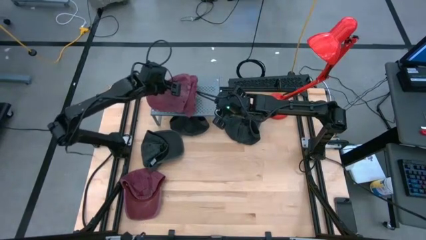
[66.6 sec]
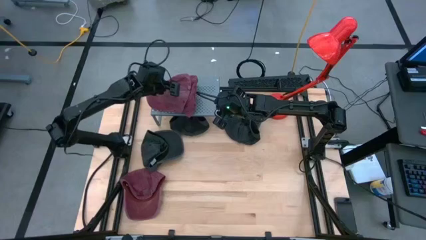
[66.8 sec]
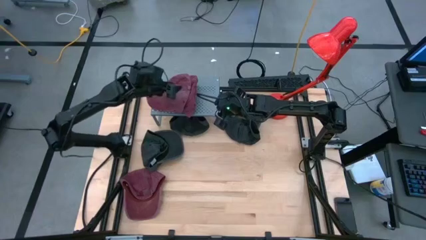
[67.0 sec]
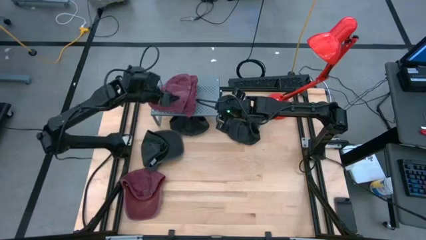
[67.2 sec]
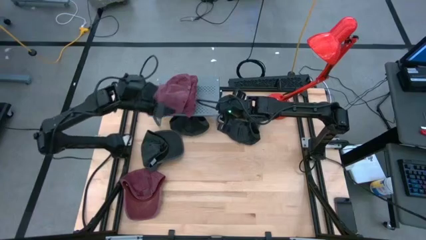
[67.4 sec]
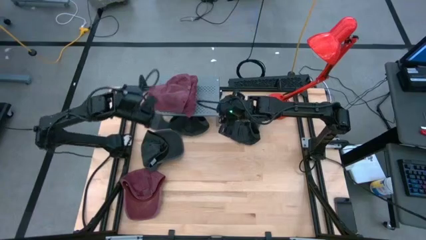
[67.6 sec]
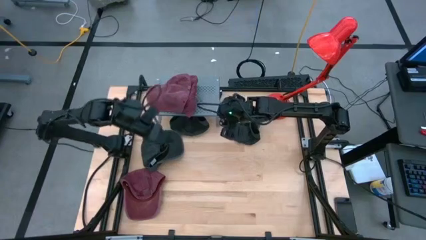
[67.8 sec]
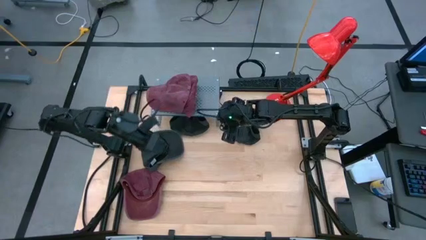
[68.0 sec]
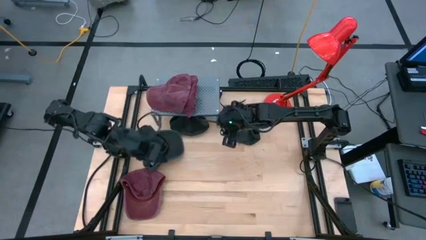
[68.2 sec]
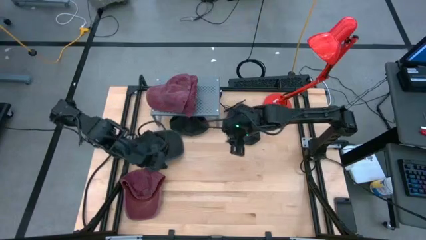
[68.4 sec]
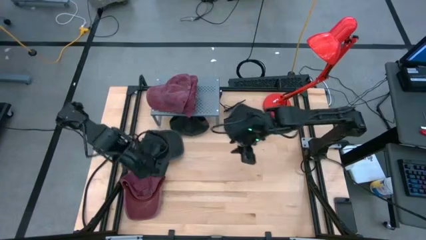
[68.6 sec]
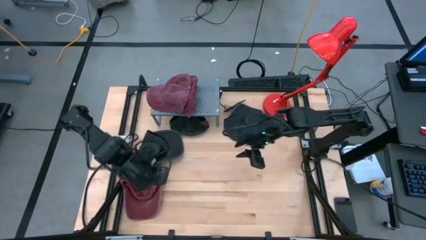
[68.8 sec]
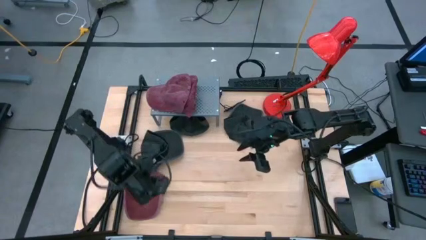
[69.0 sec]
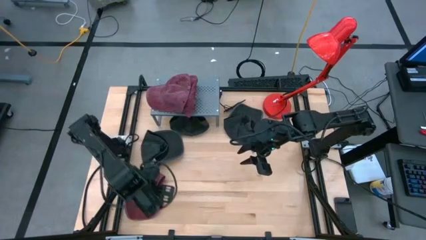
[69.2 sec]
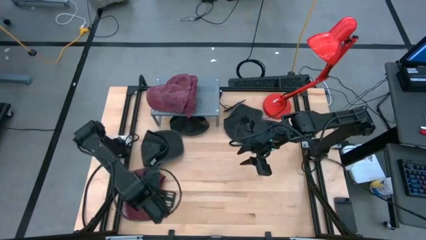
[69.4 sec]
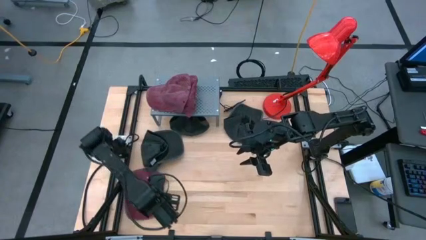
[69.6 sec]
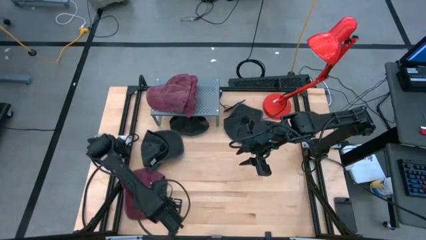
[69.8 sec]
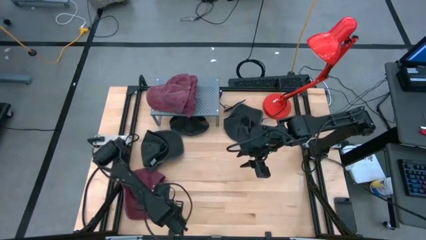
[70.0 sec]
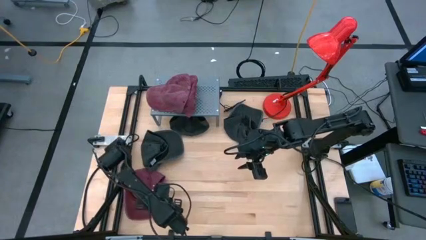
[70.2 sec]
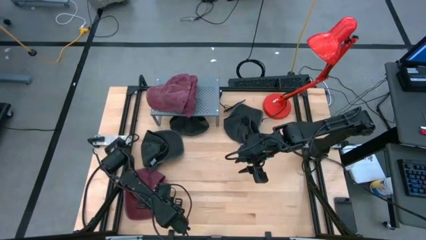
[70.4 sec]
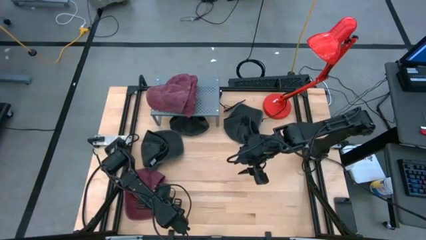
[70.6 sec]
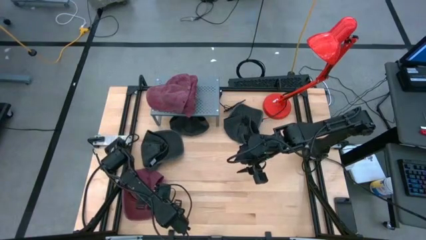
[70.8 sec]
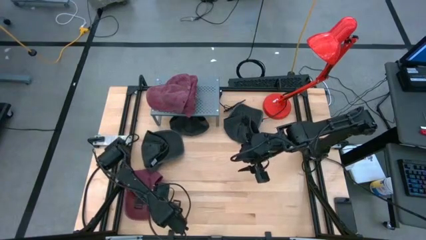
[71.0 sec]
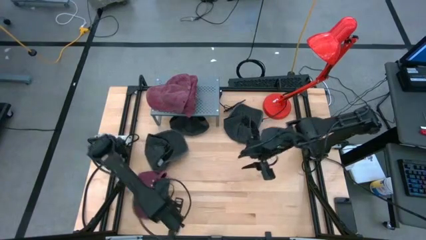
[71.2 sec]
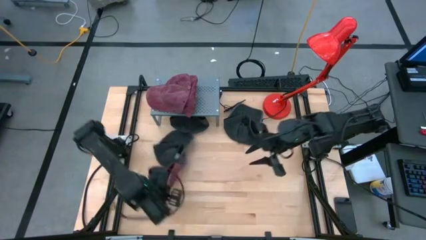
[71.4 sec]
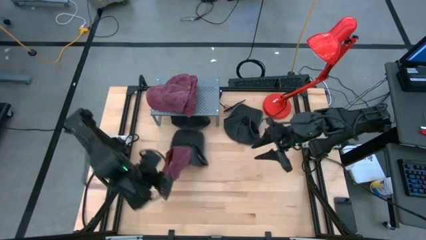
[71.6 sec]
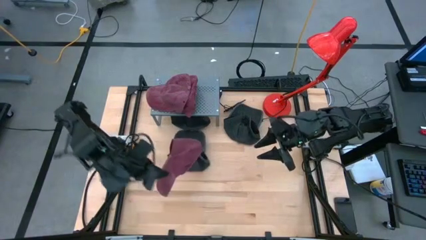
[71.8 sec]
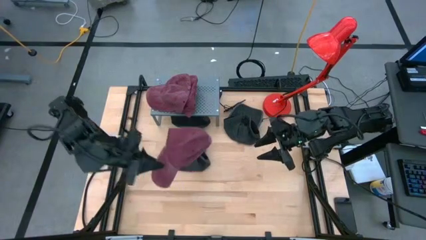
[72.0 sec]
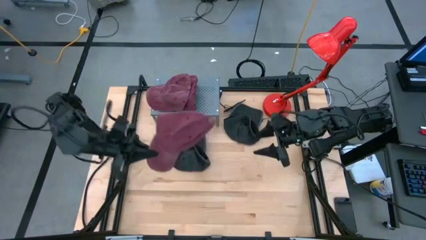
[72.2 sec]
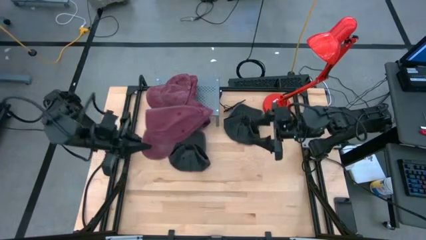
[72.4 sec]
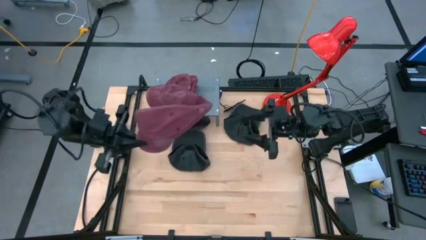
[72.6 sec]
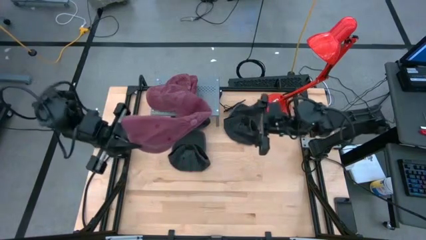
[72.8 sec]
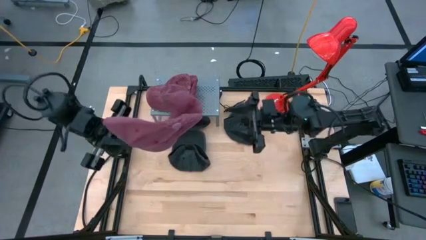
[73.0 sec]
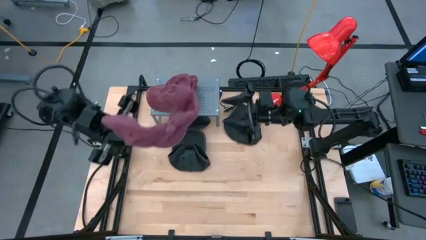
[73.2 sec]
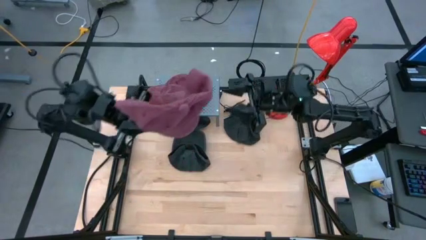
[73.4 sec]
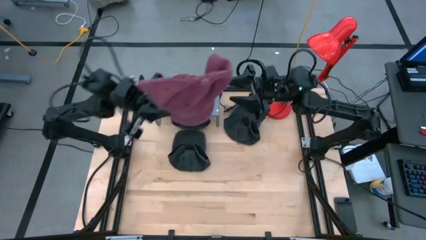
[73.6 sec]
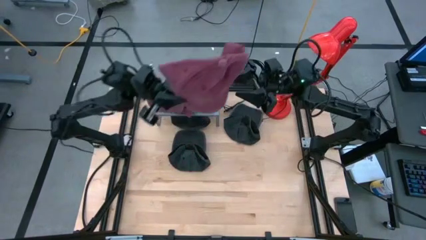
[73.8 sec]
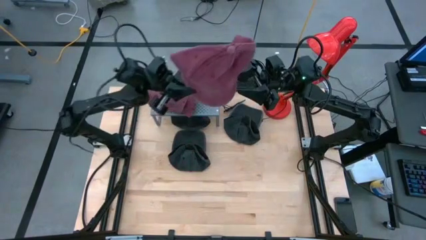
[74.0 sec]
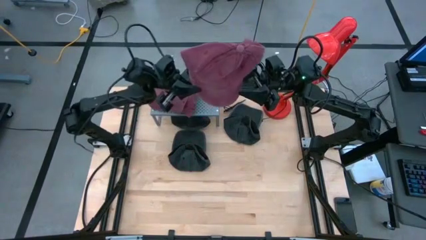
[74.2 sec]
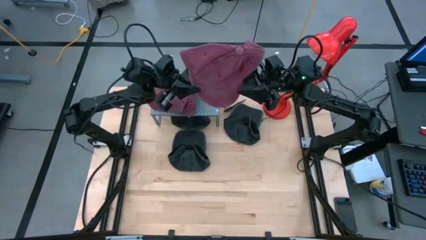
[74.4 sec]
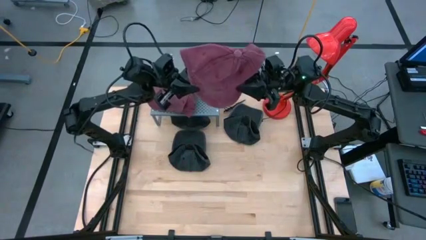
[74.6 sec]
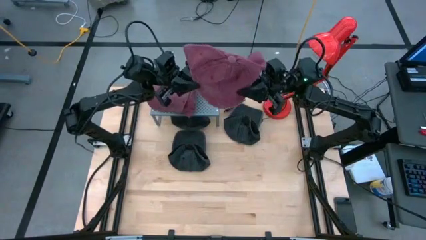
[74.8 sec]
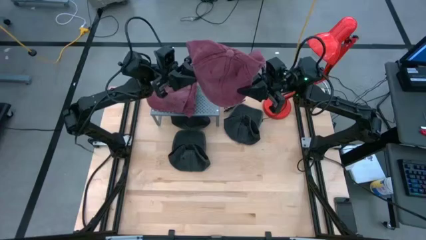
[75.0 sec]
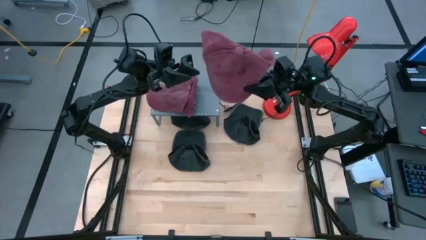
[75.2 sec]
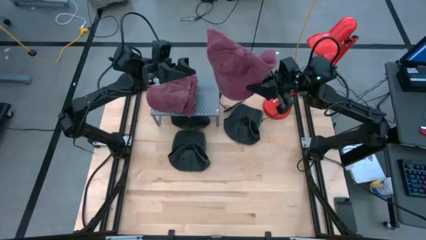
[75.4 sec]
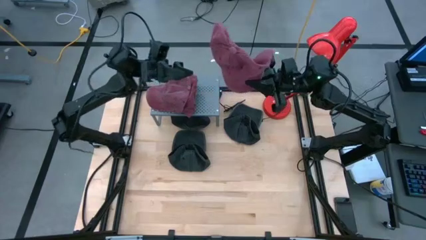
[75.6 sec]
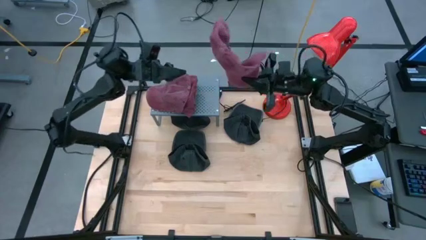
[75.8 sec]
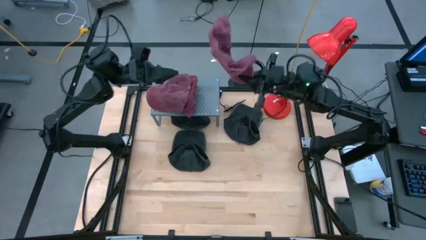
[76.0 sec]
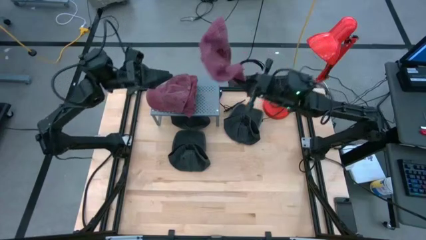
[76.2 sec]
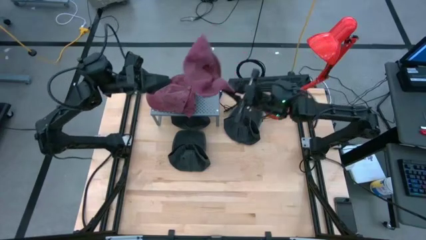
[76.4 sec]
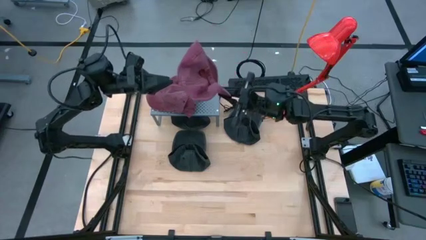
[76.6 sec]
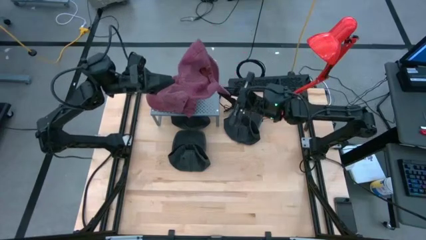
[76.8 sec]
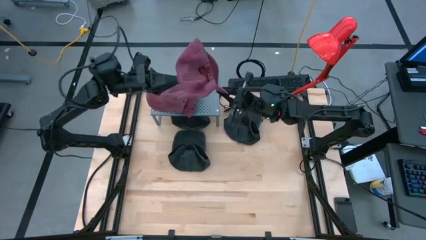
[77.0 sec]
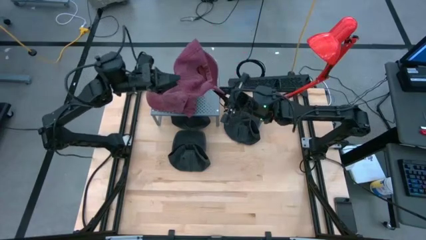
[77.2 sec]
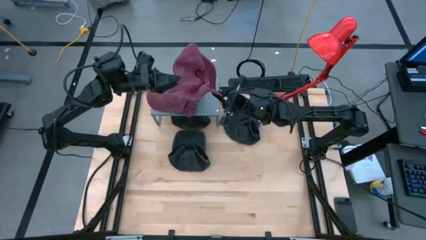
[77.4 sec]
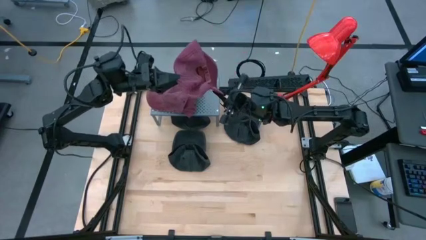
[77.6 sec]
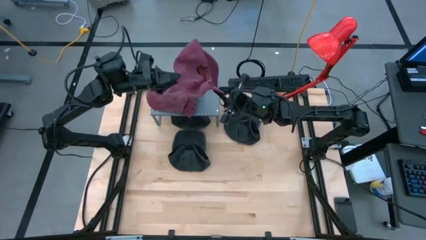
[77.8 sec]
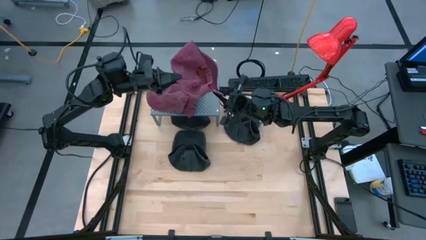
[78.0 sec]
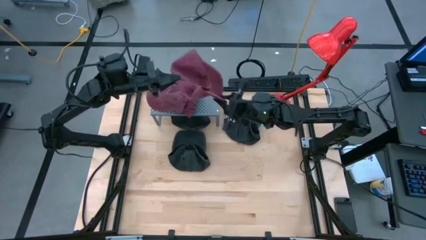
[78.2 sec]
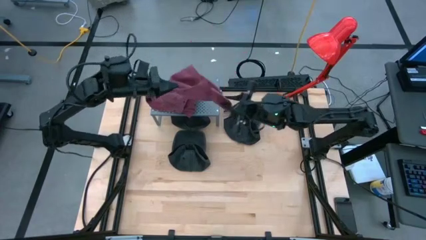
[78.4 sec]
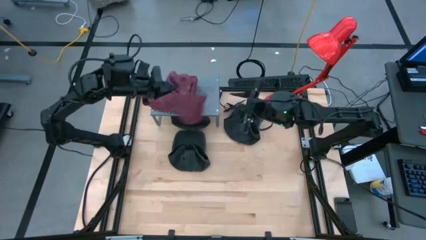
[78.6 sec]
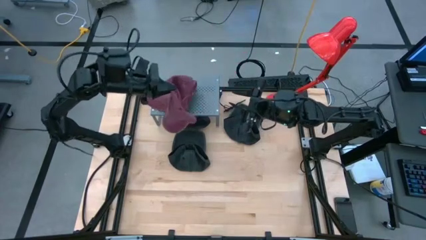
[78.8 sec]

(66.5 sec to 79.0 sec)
Task: Pick & Place hat
Stack the red cap on top of the red cap on the shelf

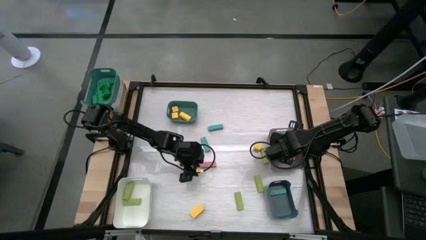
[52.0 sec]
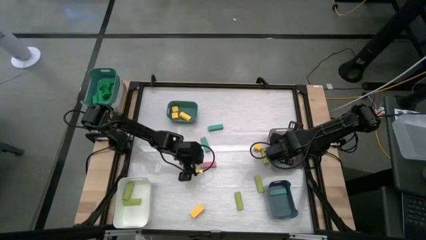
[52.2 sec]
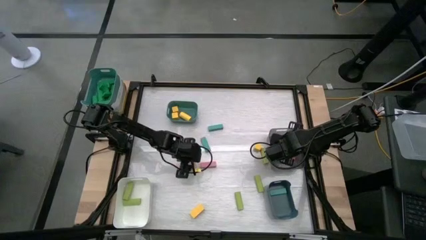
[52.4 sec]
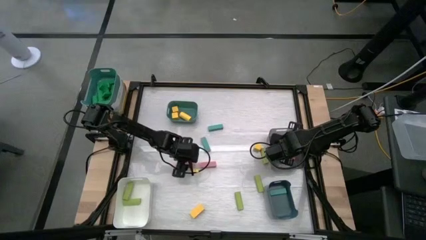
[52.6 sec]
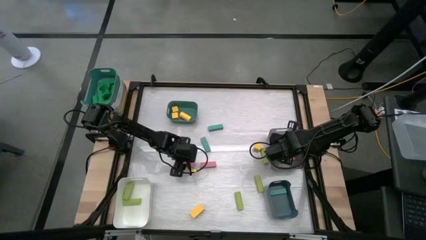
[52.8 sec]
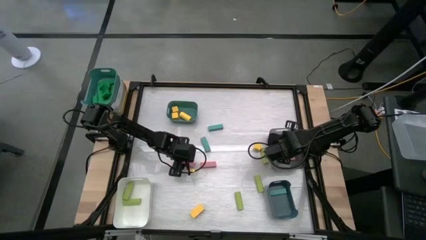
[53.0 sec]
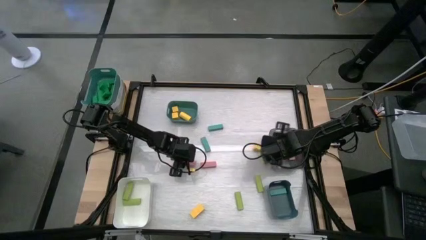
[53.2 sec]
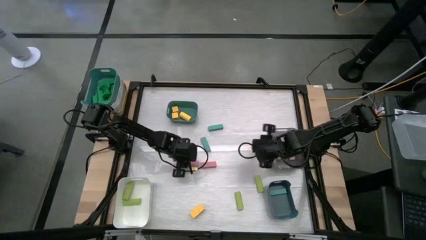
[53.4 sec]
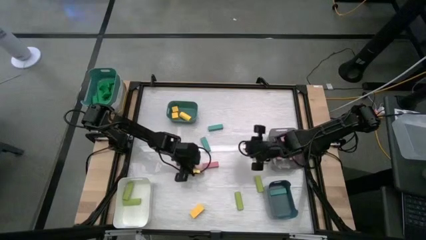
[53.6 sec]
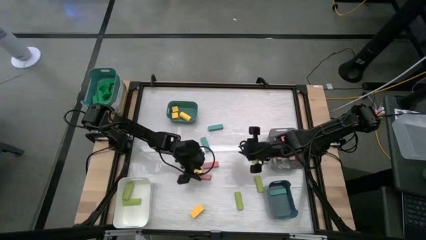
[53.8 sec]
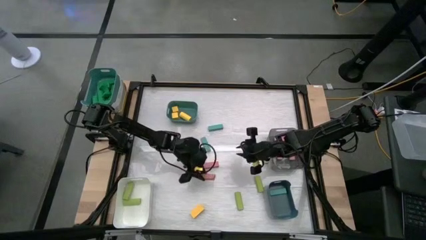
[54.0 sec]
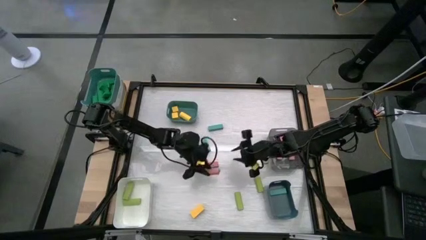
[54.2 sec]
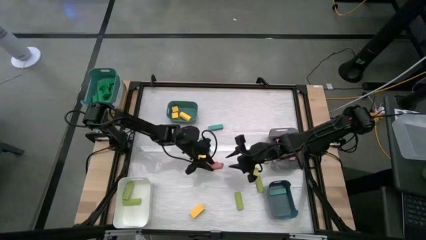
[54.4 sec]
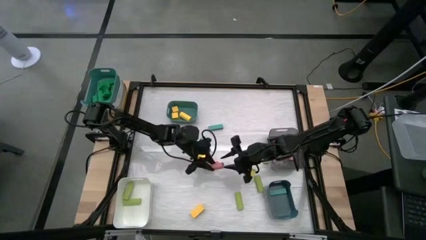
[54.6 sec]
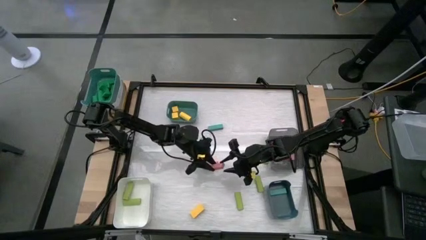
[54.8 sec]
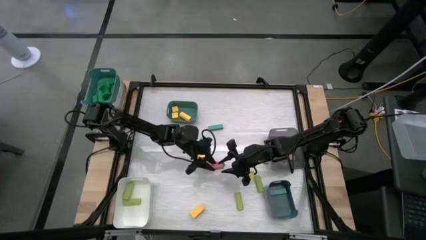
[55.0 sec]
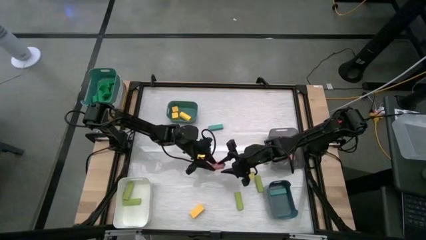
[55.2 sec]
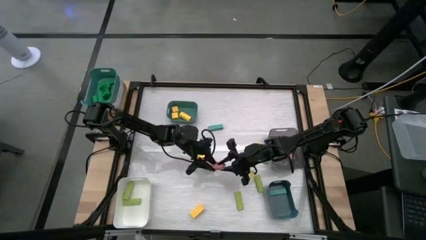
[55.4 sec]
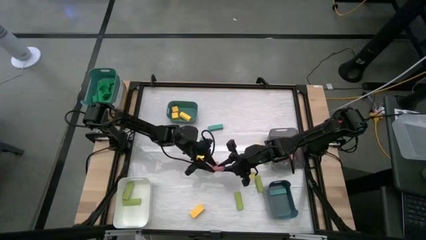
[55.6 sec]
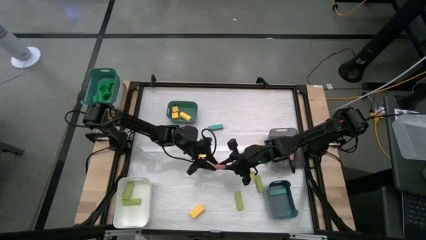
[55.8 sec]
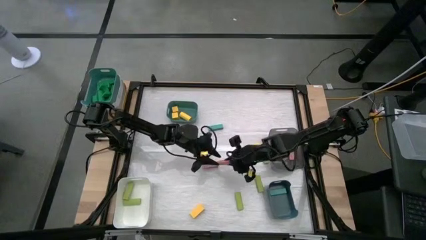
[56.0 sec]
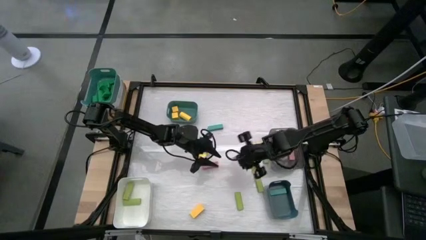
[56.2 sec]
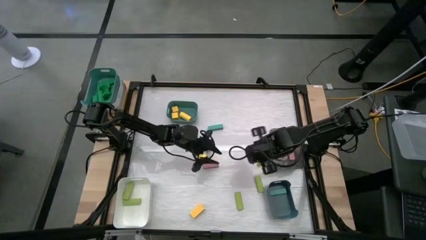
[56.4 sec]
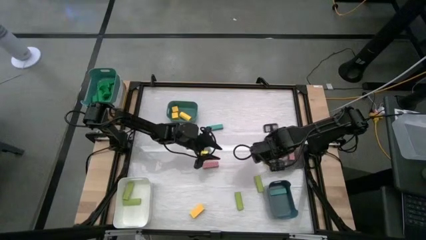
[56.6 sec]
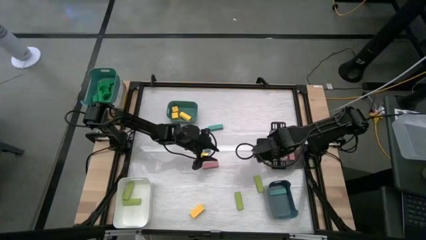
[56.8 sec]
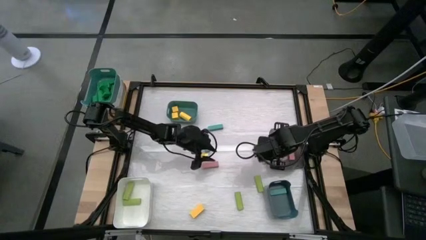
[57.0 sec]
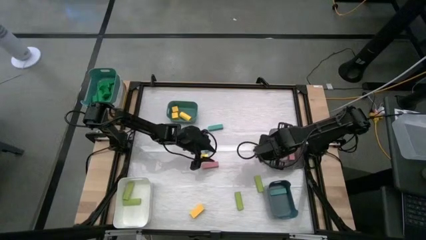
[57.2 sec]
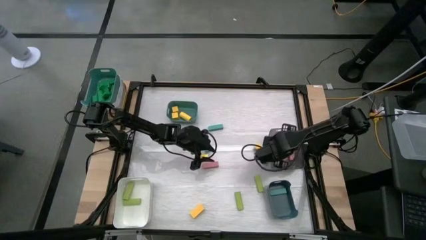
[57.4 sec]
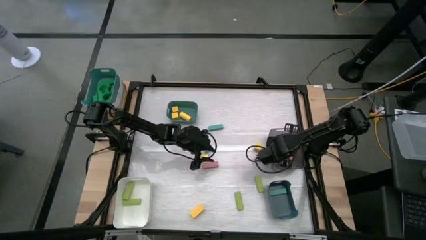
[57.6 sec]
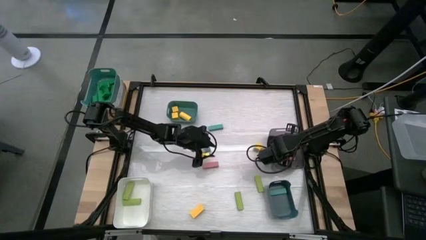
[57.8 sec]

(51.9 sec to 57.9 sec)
Task: Sort blocks
Put the pink block into the black bin
